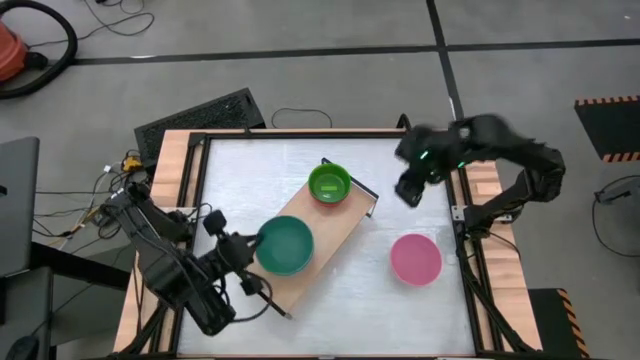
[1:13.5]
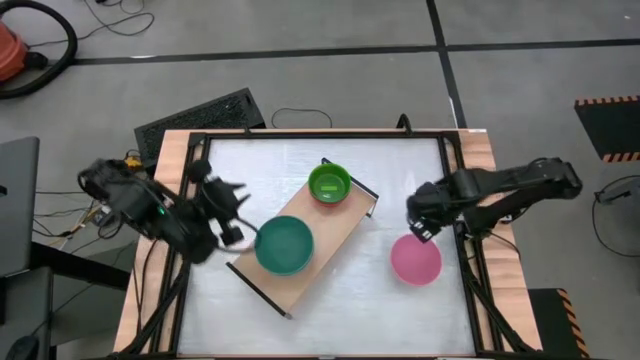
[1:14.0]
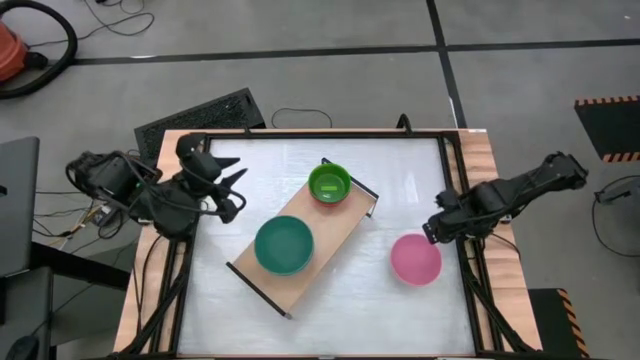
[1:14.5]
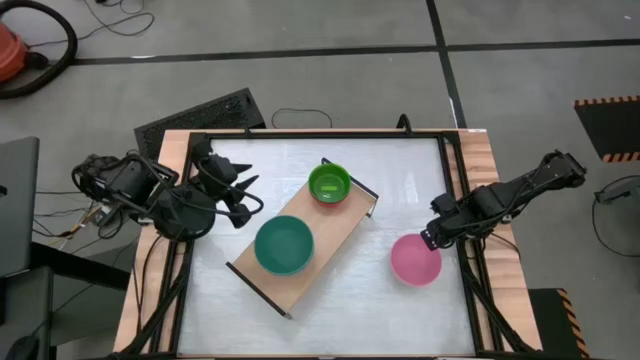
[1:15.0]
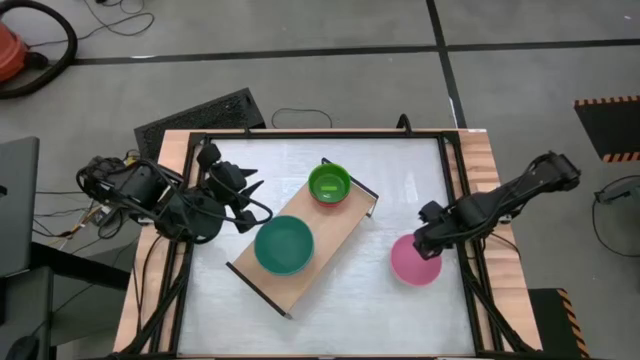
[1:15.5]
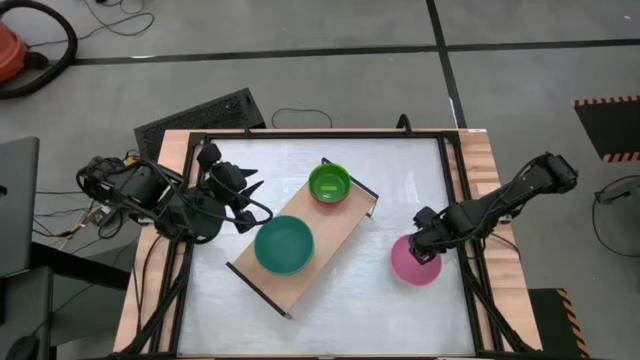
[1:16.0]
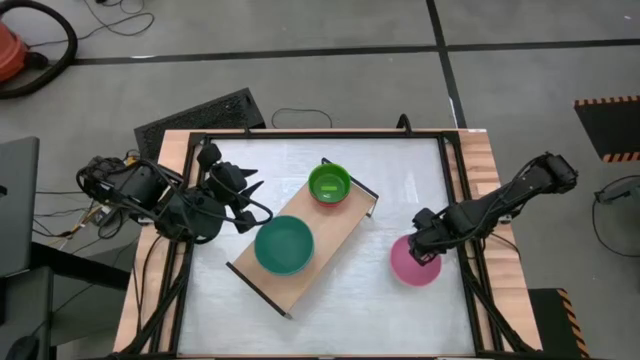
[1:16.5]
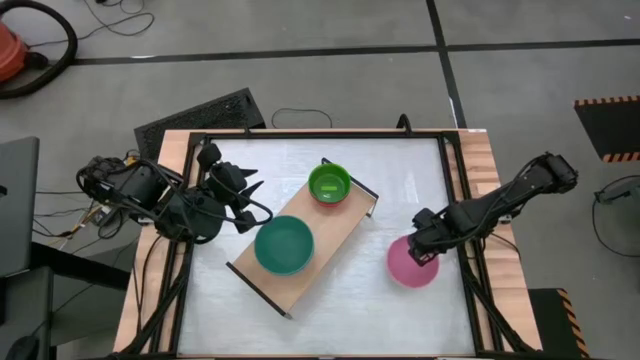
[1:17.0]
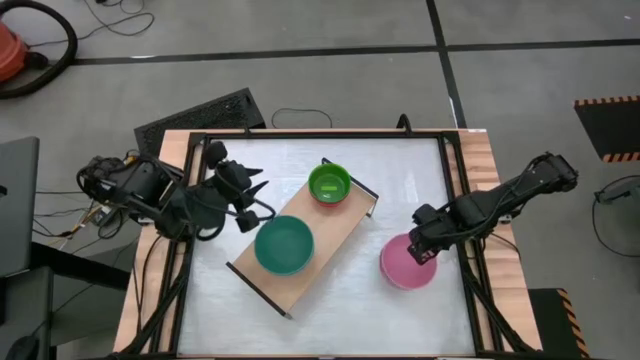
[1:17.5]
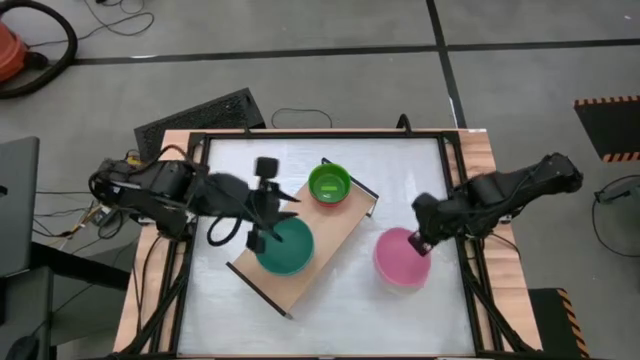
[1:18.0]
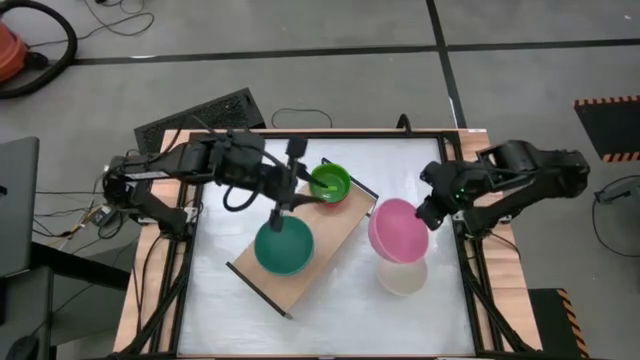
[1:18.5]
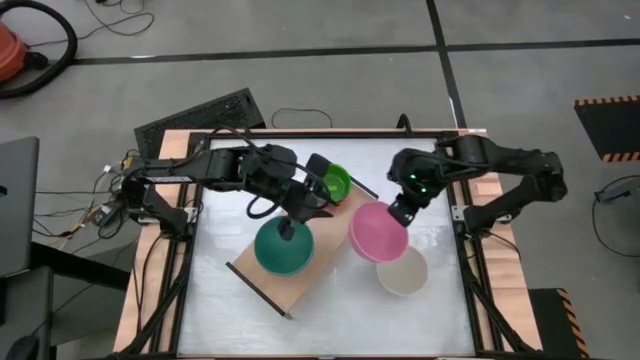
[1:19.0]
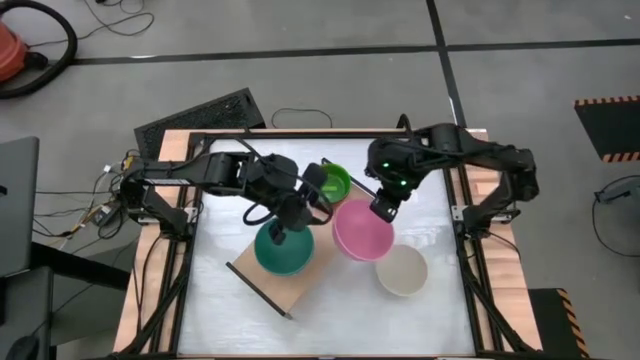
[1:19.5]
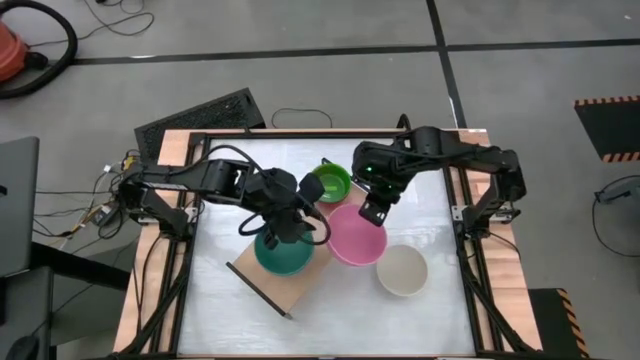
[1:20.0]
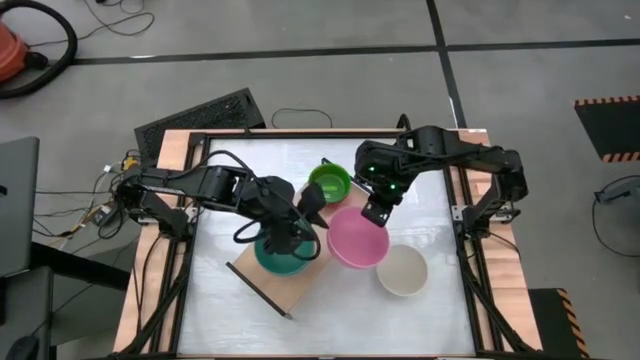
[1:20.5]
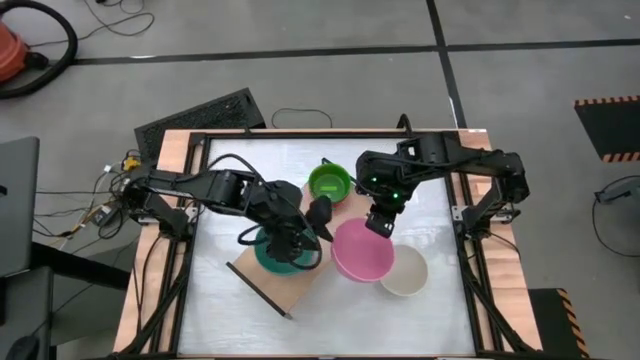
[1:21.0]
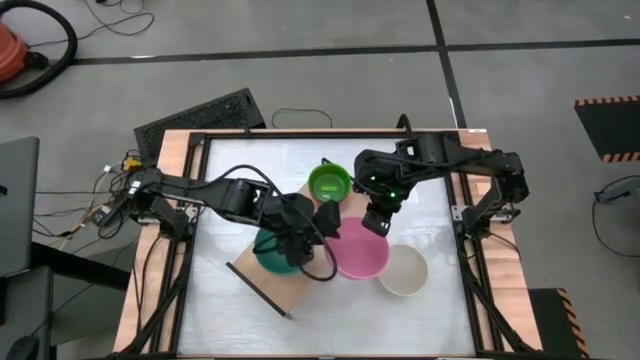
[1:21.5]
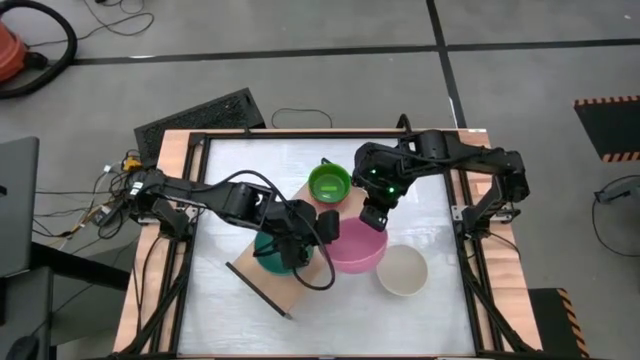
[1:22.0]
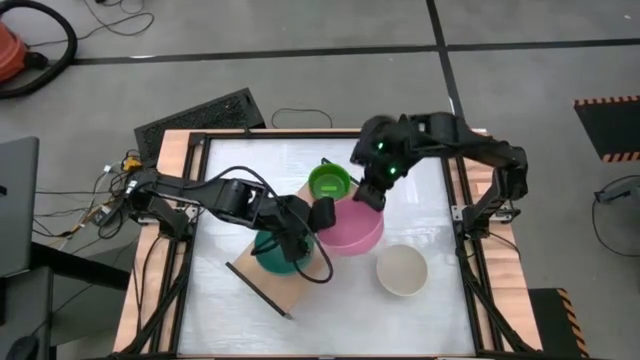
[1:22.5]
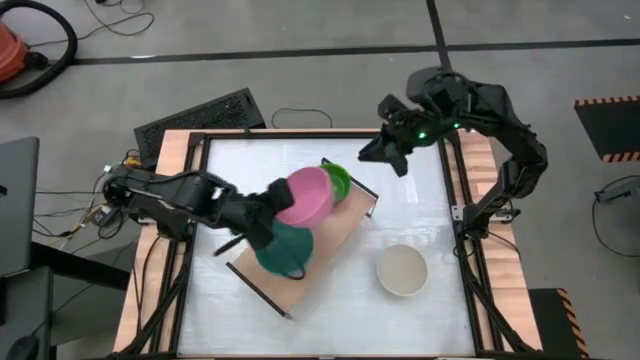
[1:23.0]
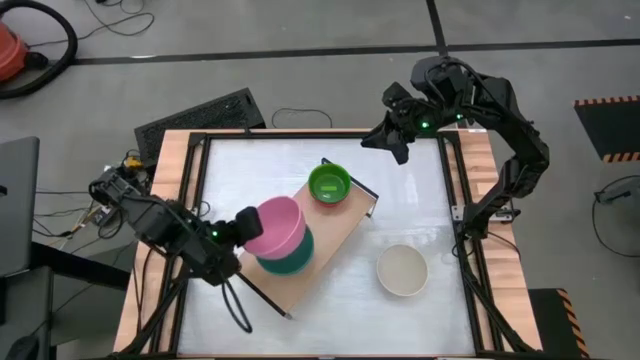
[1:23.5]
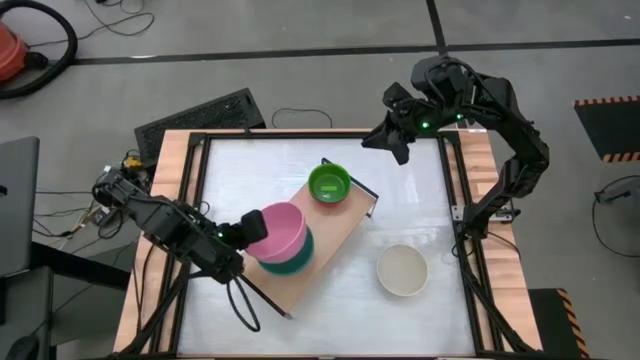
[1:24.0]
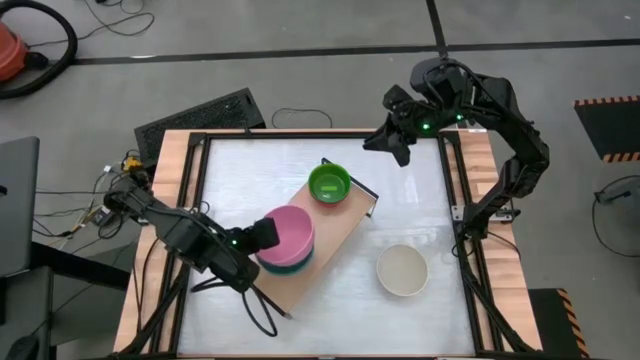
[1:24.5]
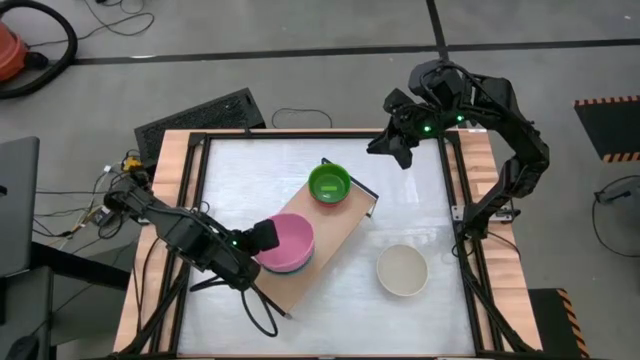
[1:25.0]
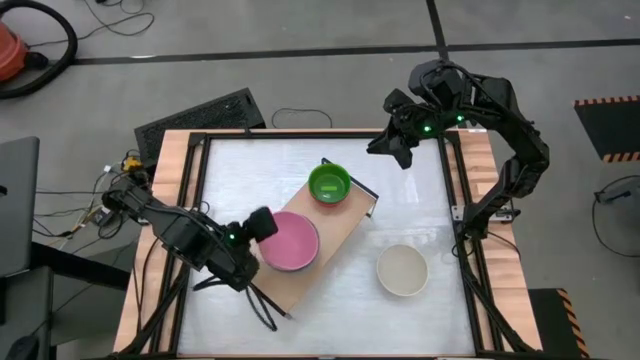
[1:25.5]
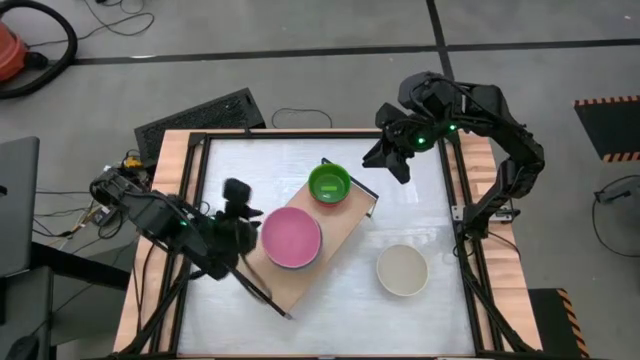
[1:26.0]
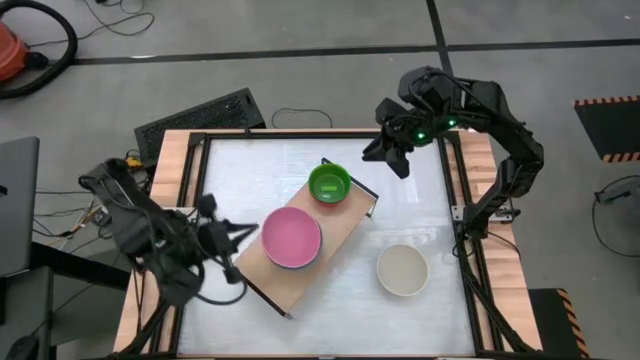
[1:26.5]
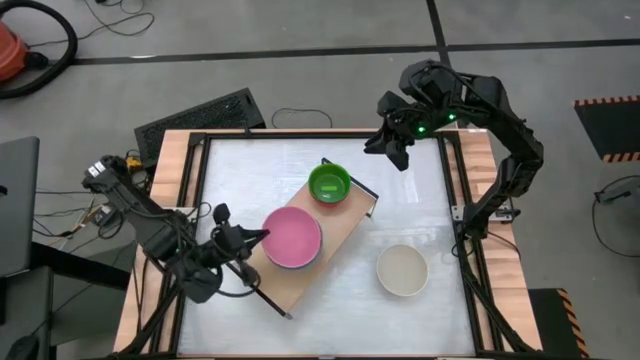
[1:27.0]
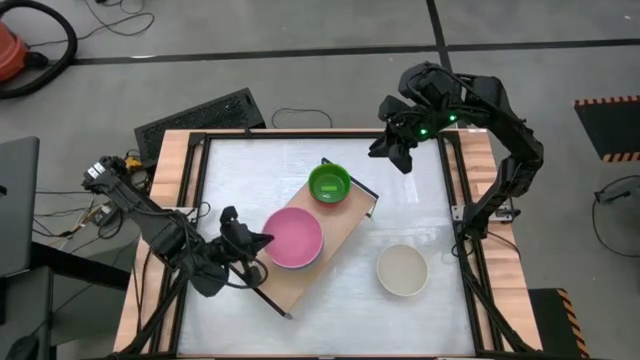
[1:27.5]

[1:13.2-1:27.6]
Task: Place and stack bowls onto a shelf
Stack the pink bowl onto the green bowl on the shelf

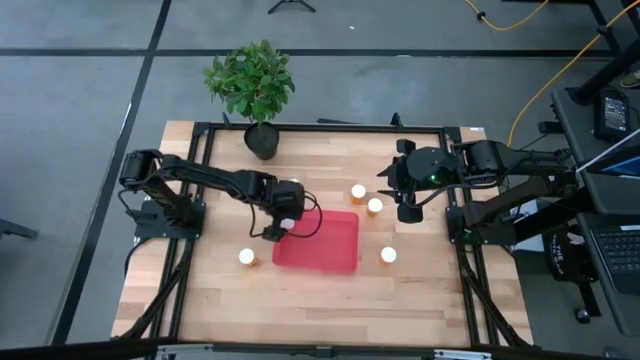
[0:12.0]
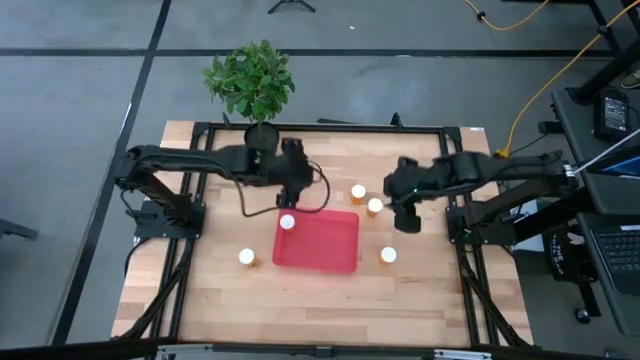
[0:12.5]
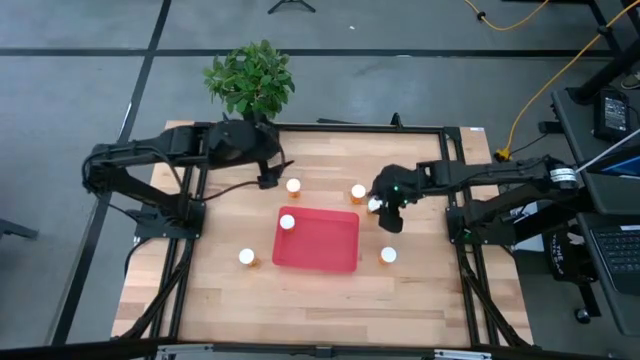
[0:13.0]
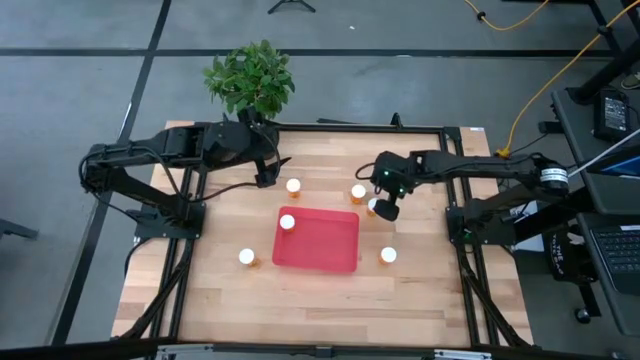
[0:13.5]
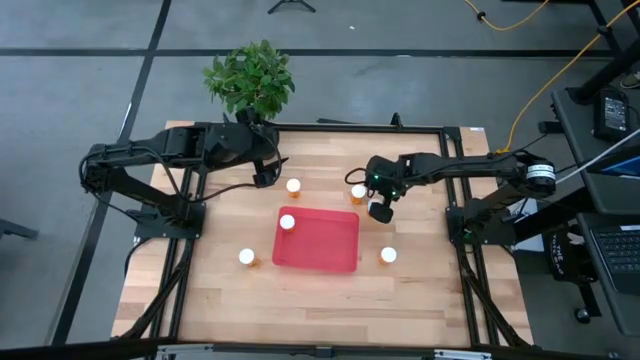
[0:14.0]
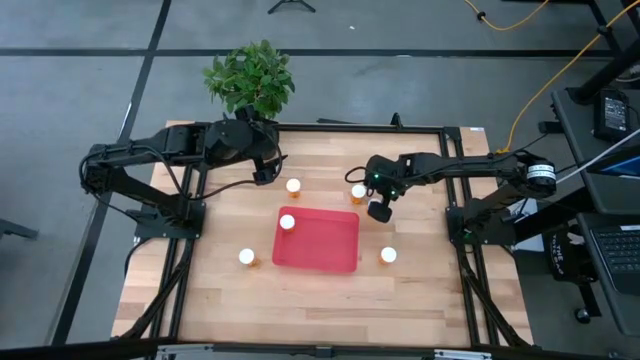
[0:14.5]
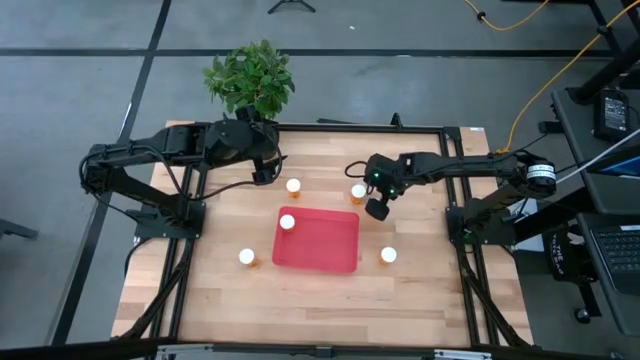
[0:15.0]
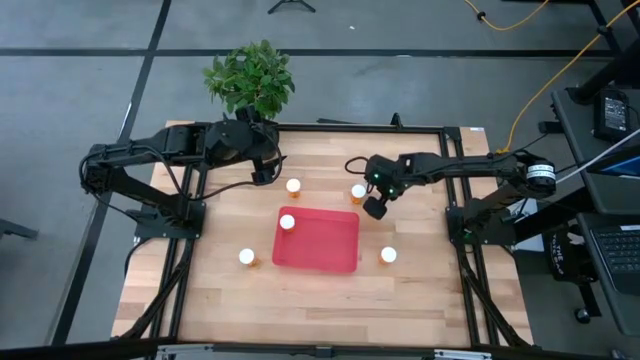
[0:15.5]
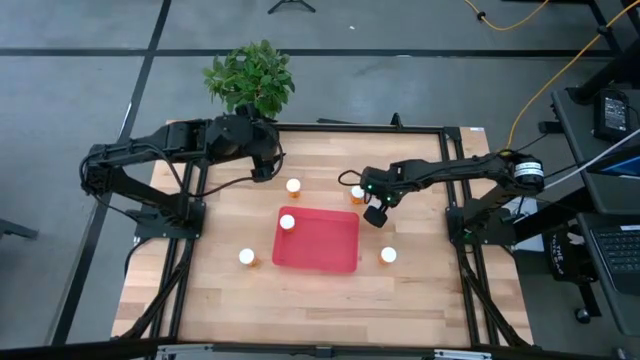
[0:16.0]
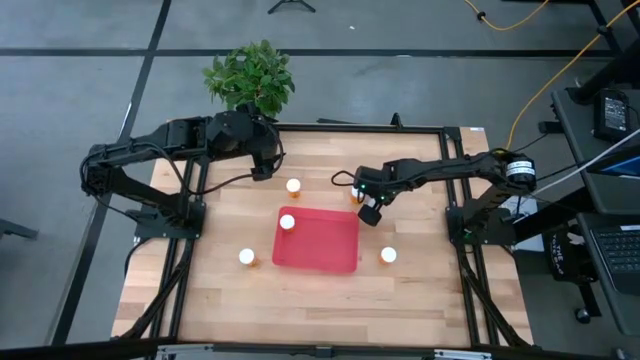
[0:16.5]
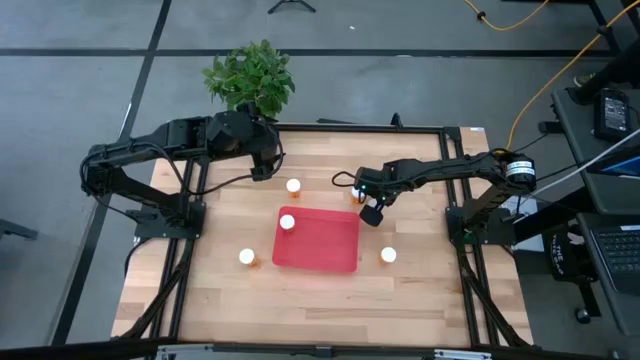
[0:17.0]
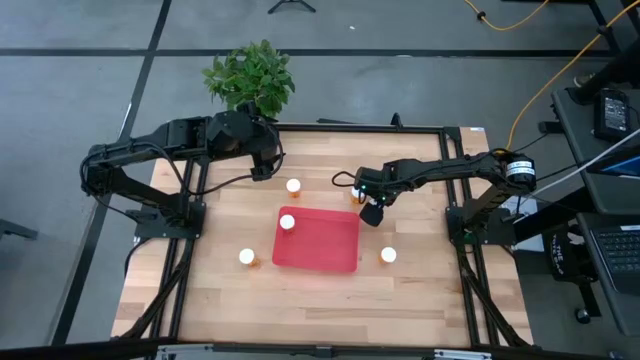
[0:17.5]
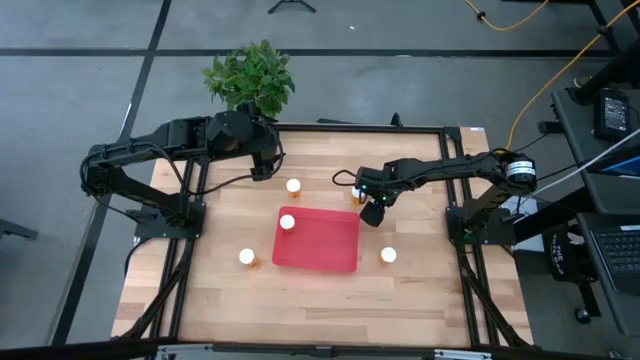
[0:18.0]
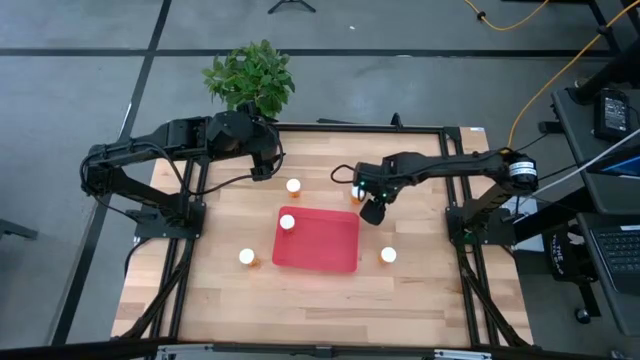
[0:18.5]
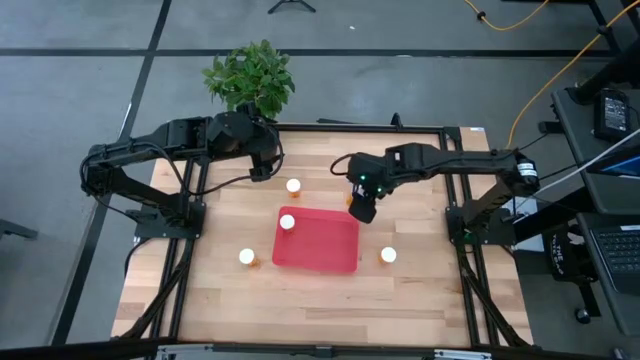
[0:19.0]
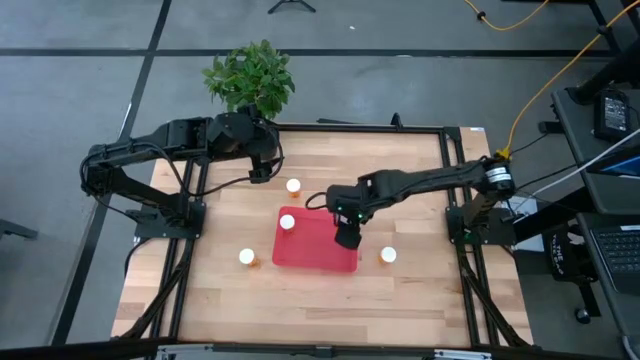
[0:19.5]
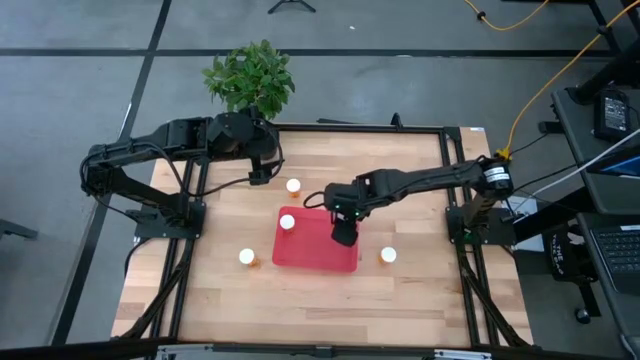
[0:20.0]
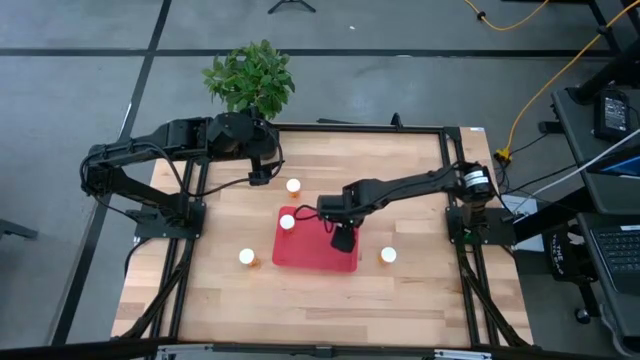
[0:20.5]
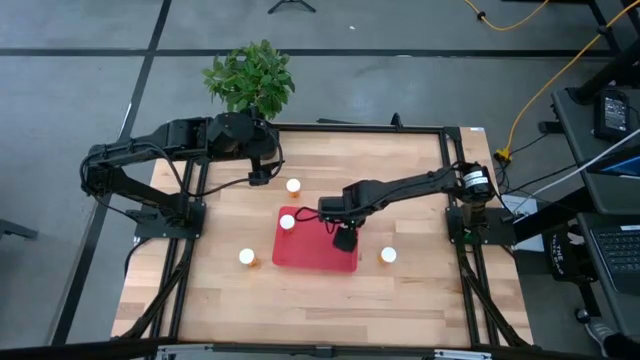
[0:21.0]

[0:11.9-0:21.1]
Task: Pick and place pill bottles into a basket
Put the orange pill bottle into the bin
